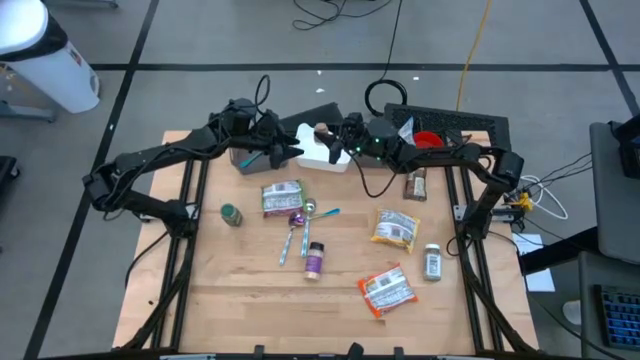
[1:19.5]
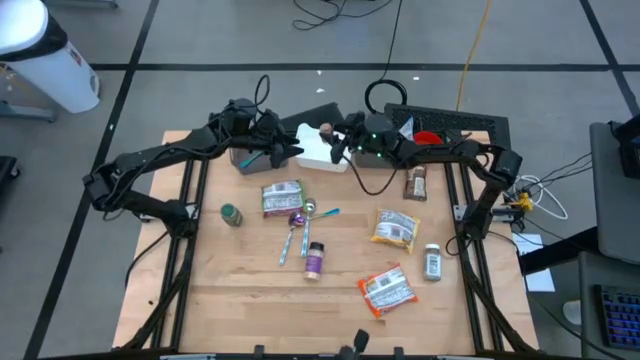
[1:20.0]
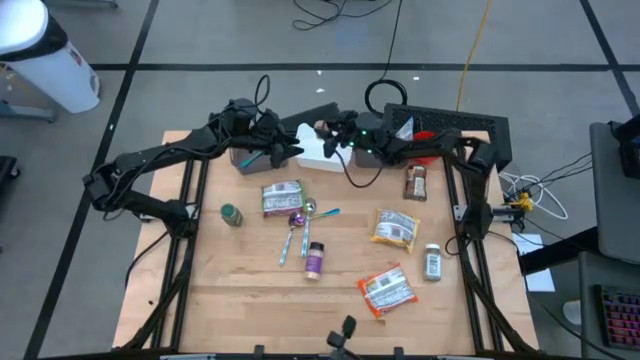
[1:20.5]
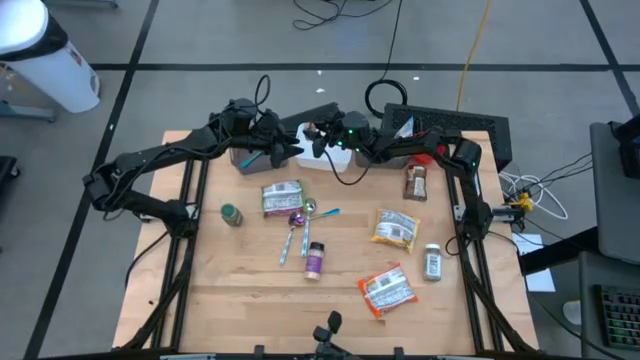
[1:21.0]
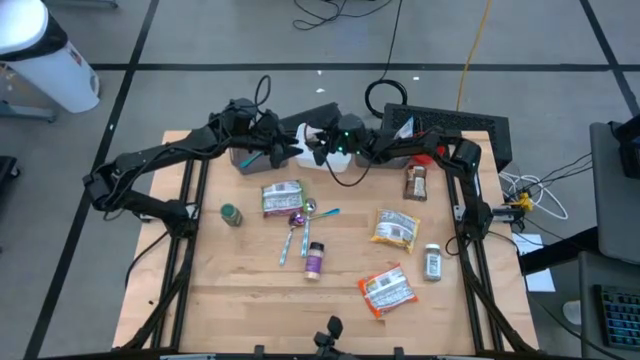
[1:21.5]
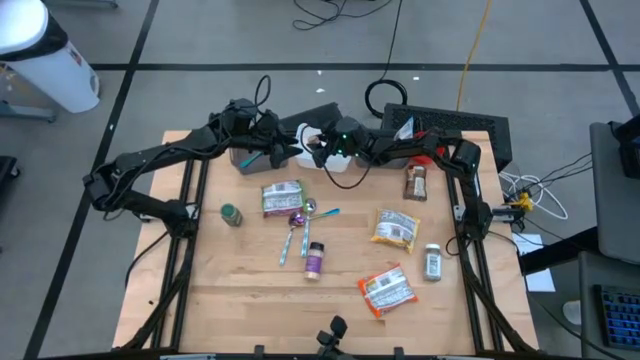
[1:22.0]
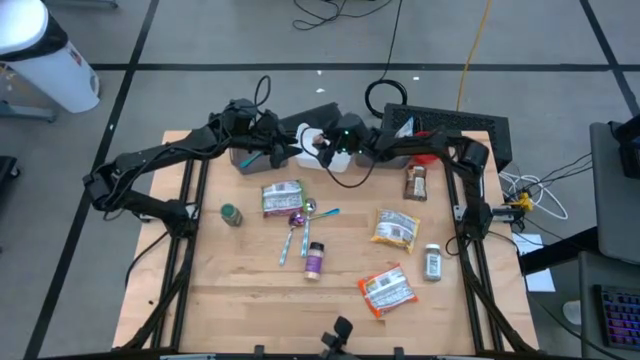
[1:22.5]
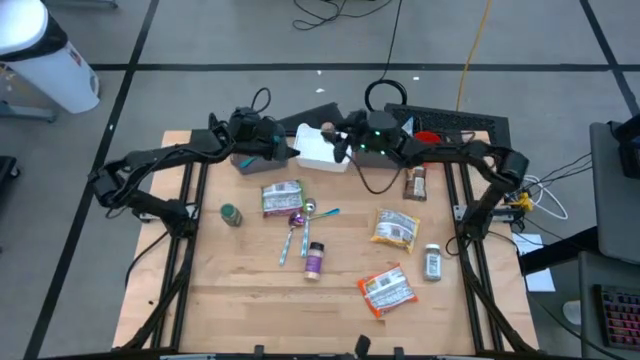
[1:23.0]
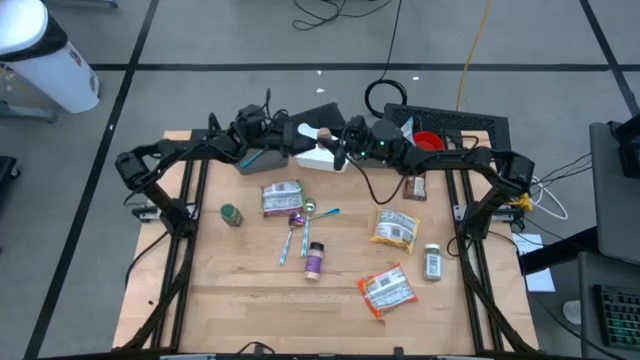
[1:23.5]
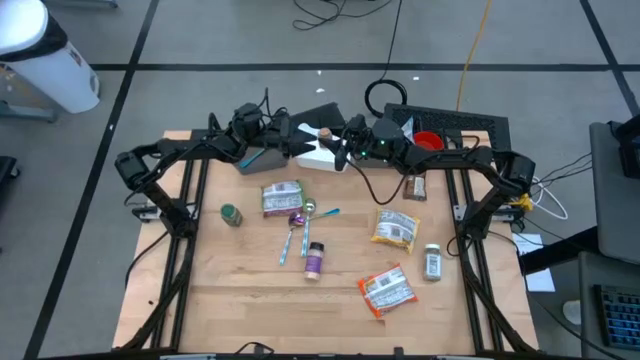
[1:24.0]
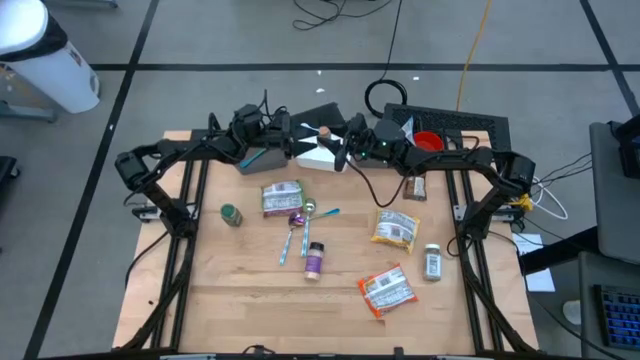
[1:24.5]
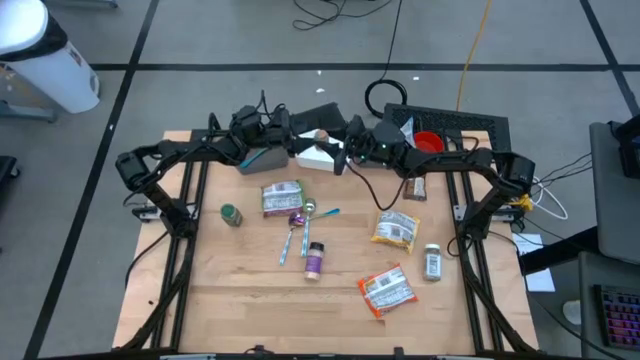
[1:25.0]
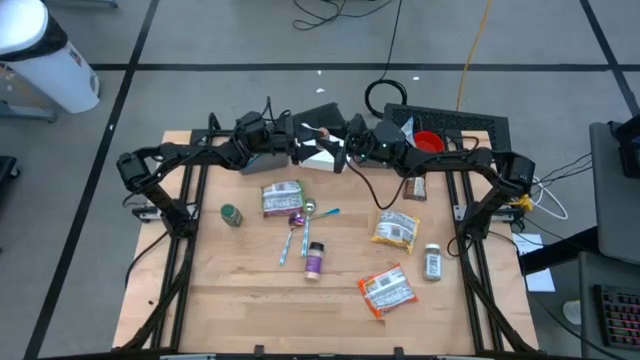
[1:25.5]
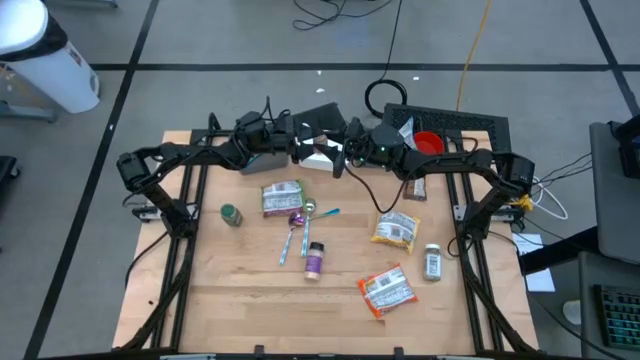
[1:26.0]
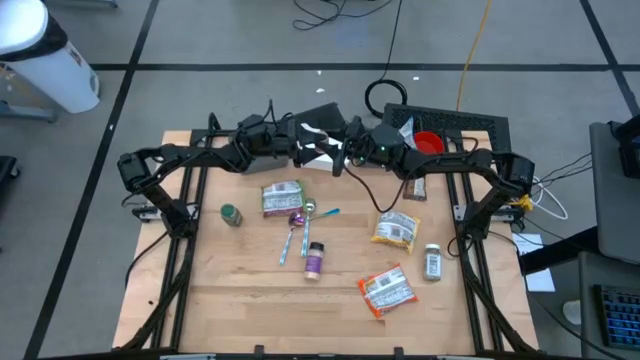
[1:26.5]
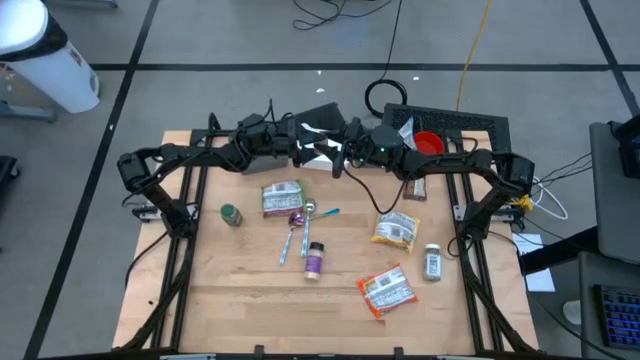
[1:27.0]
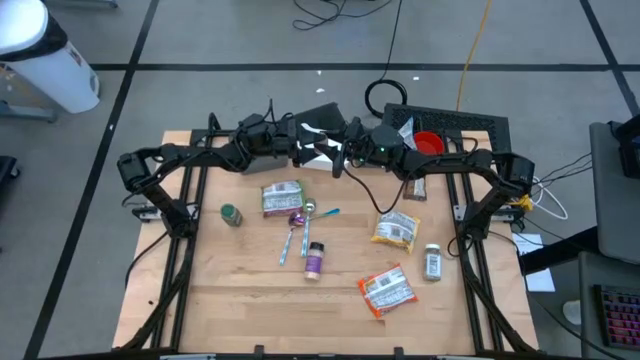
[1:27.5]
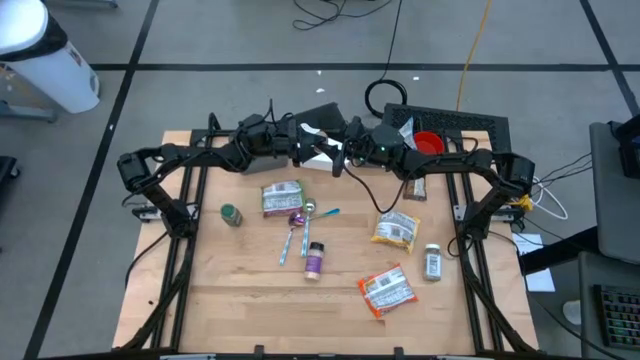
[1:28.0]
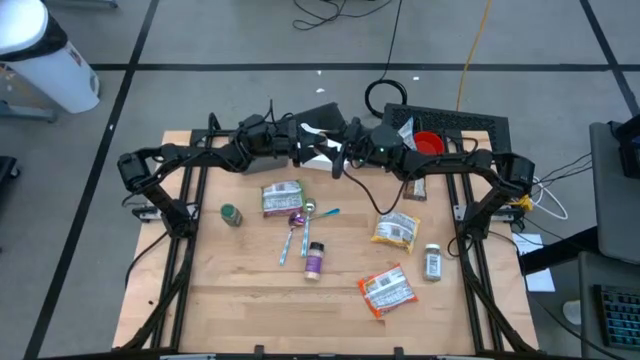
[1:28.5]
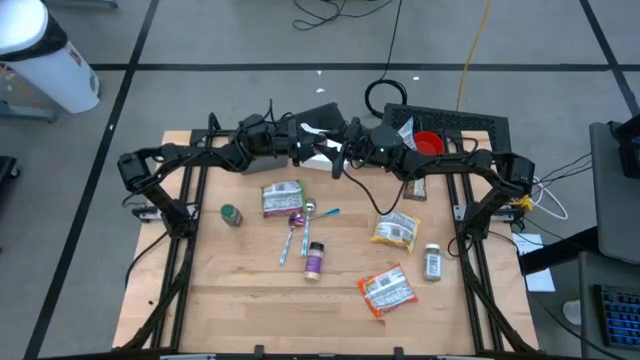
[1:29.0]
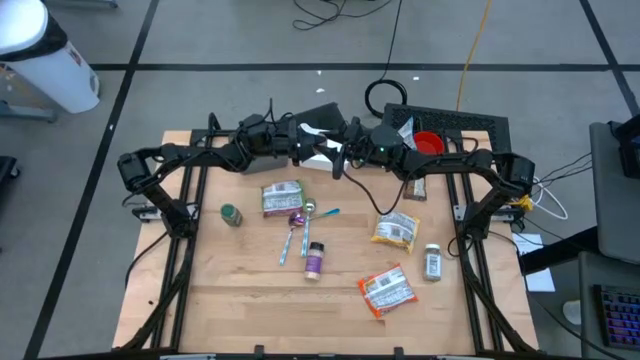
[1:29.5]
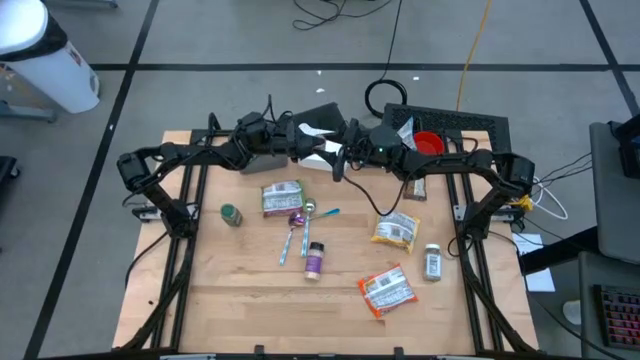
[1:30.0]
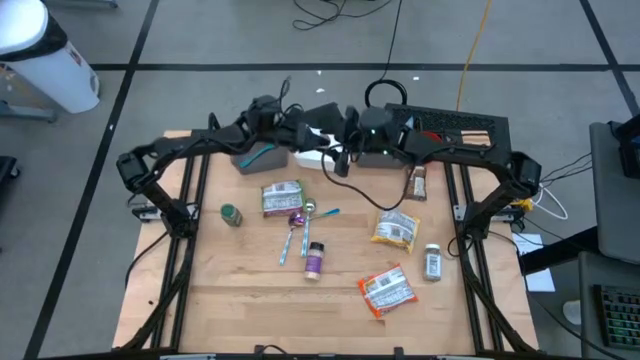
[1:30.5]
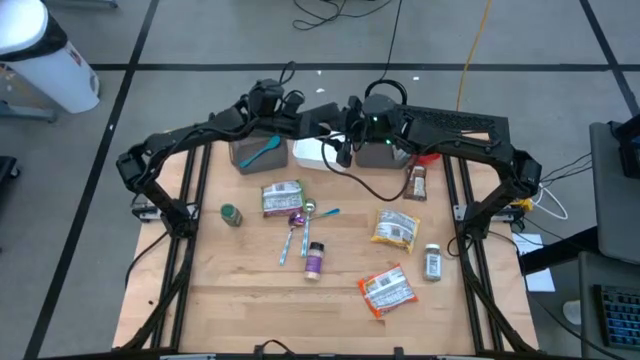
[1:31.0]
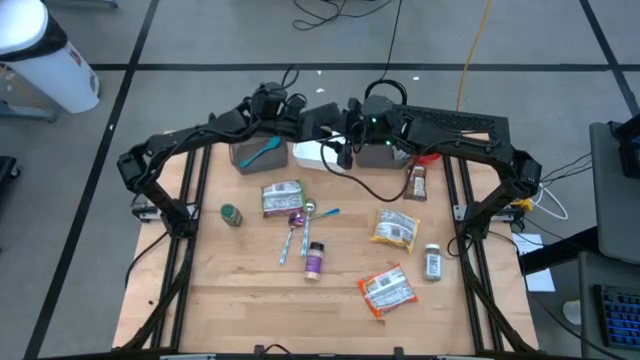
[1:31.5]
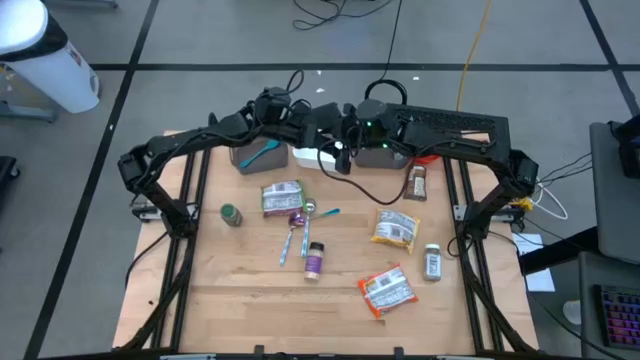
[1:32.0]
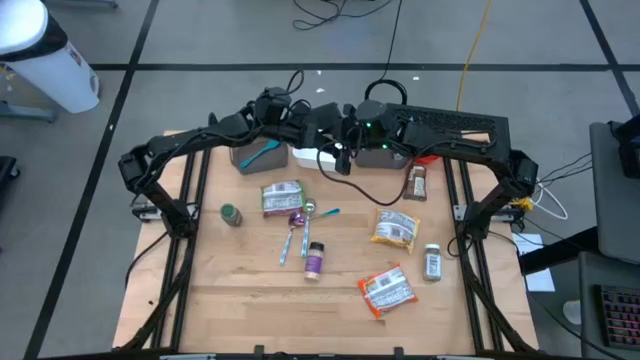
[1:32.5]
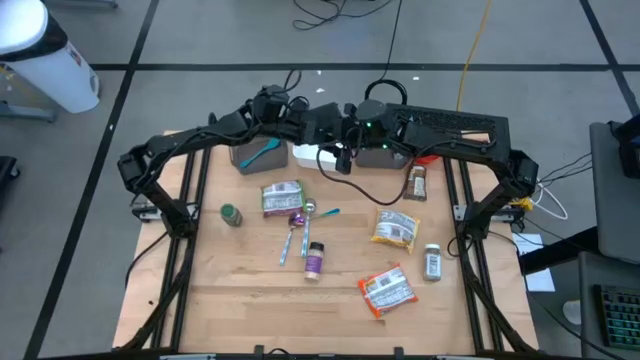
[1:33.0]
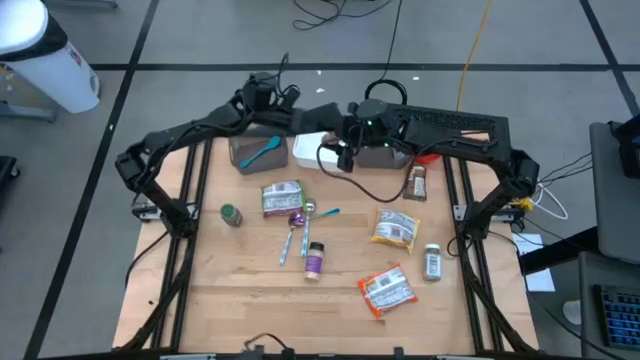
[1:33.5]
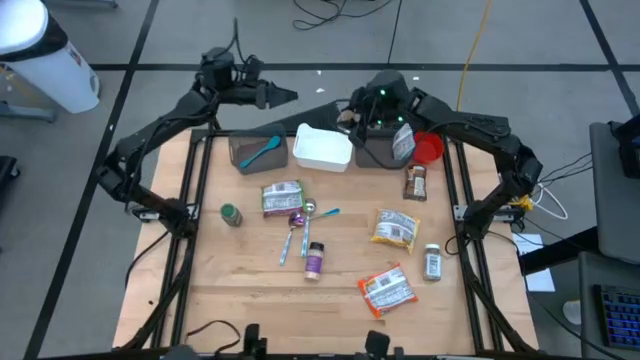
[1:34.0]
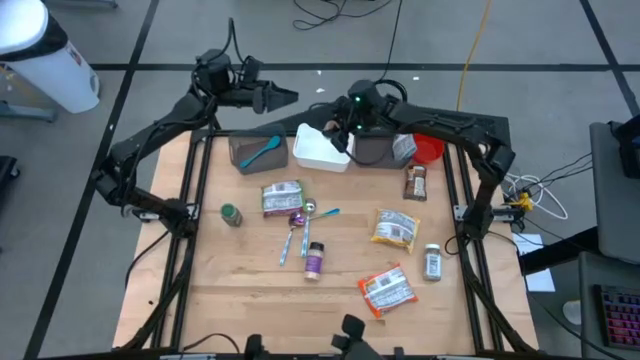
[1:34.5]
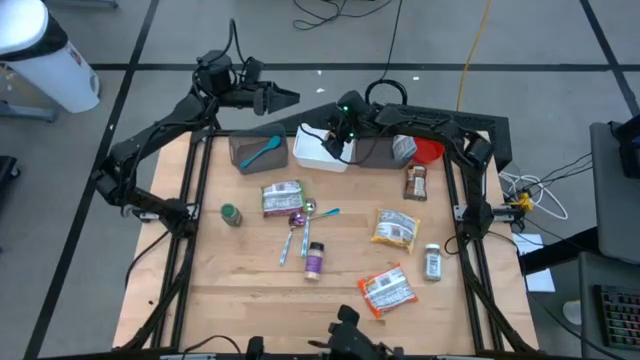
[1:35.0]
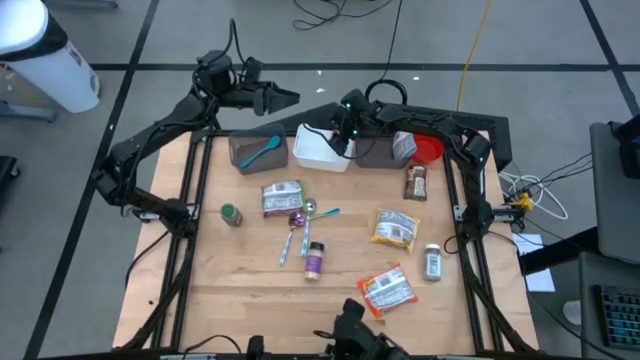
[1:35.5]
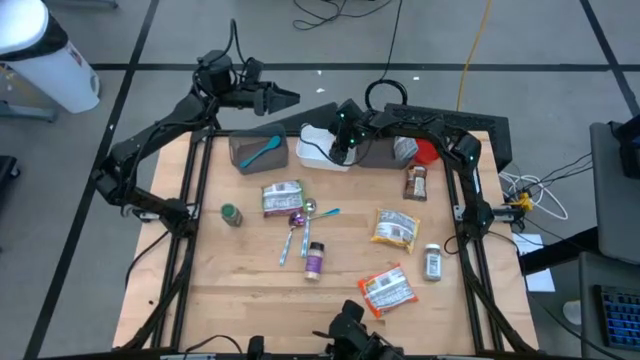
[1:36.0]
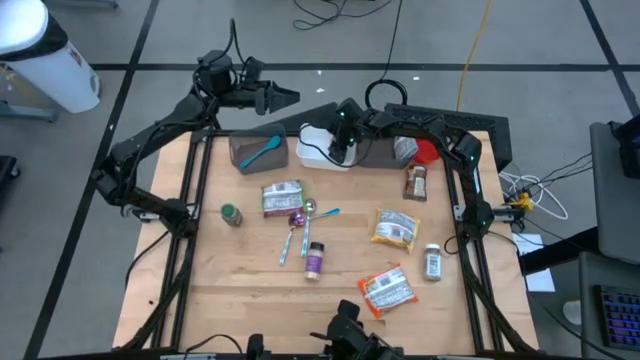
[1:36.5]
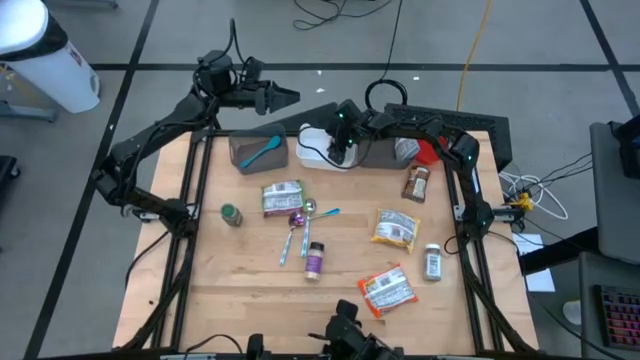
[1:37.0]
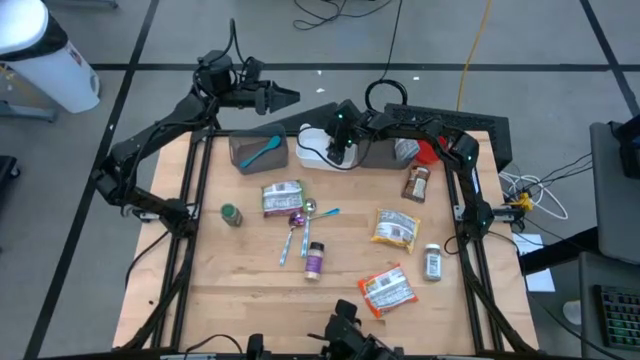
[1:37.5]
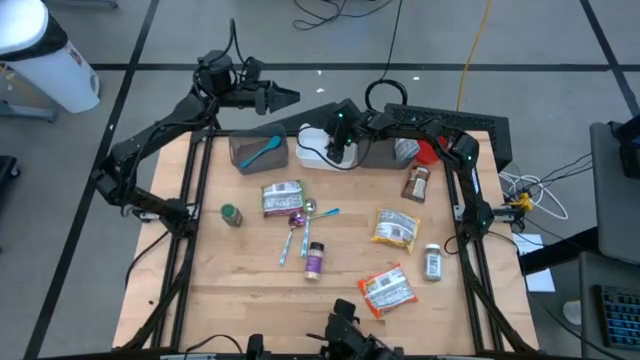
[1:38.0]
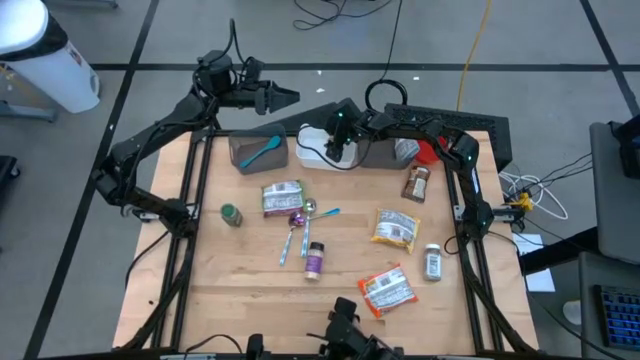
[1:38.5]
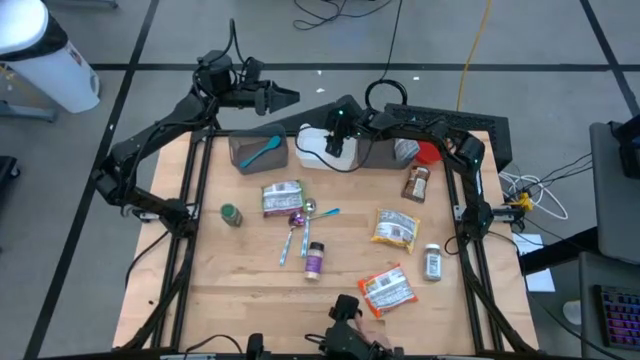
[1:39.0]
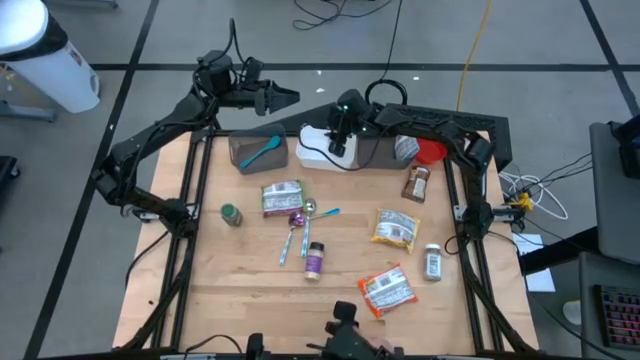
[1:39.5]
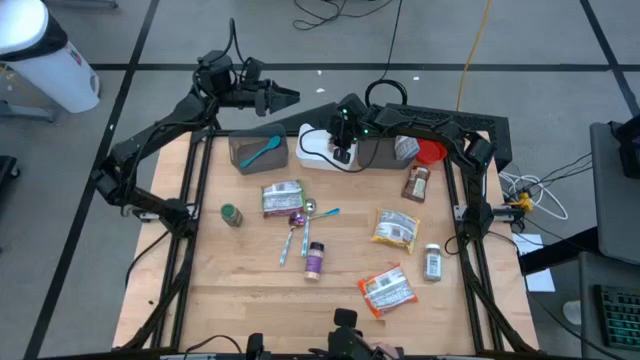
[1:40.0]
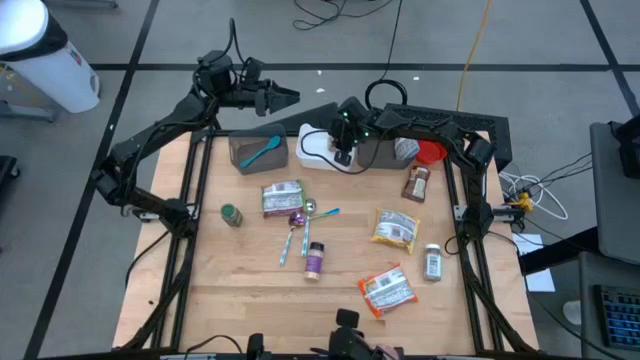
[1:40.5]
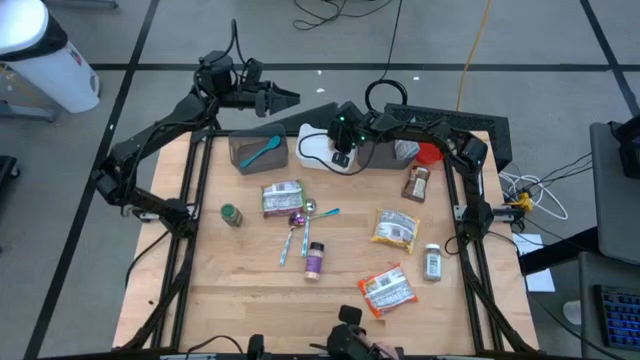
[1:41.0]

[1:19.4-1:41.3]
Task: Pick & Place Food Item
Put the brown seasoning bottle into the white bin
